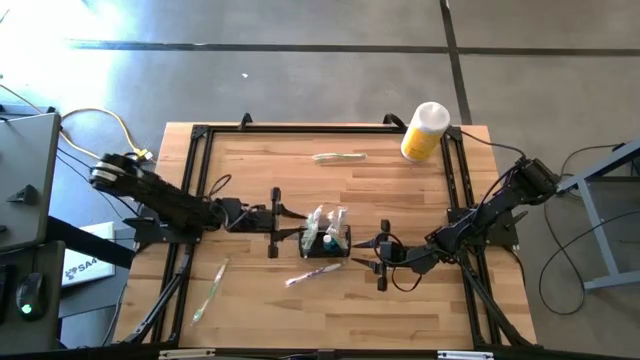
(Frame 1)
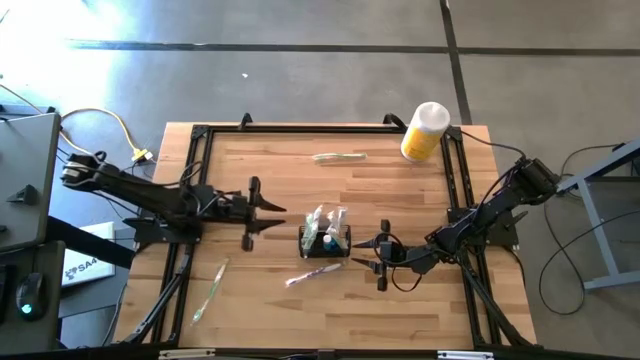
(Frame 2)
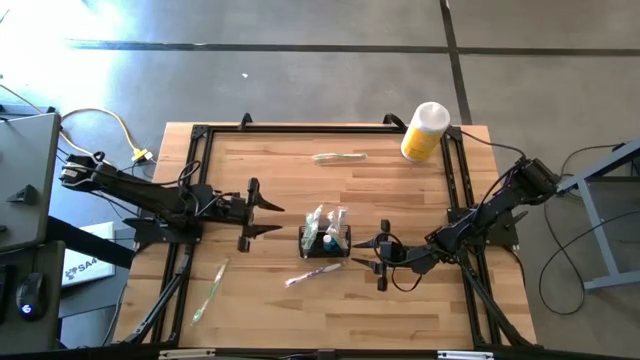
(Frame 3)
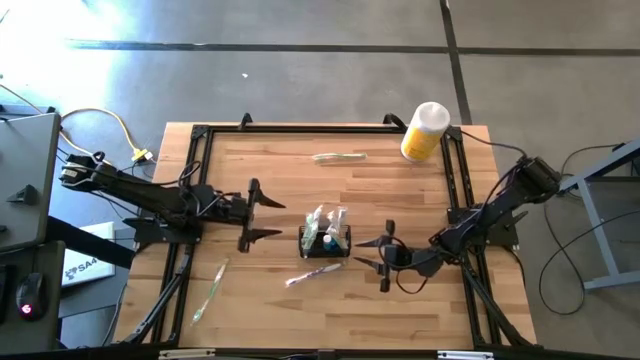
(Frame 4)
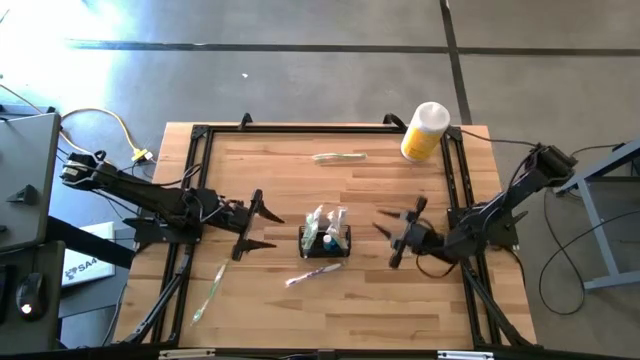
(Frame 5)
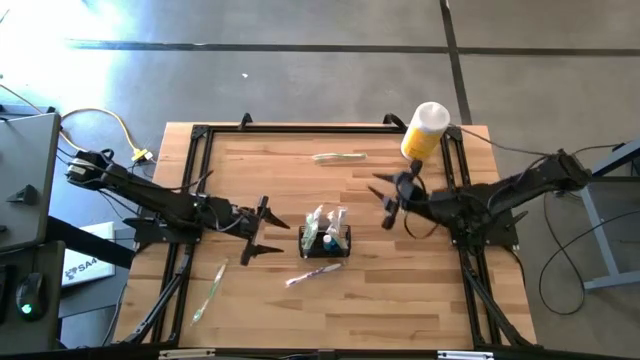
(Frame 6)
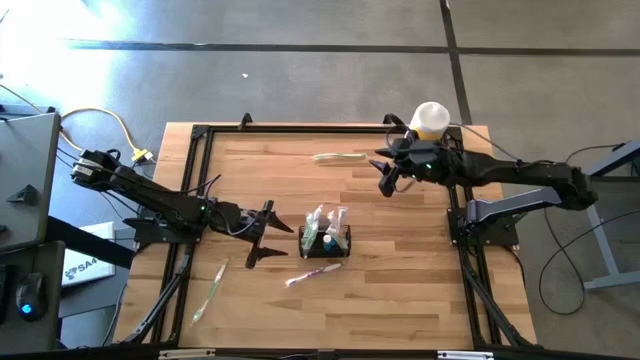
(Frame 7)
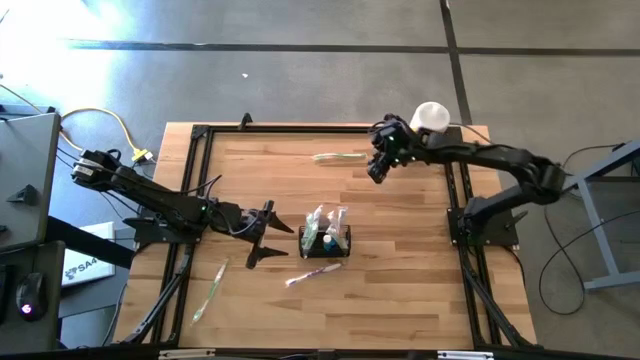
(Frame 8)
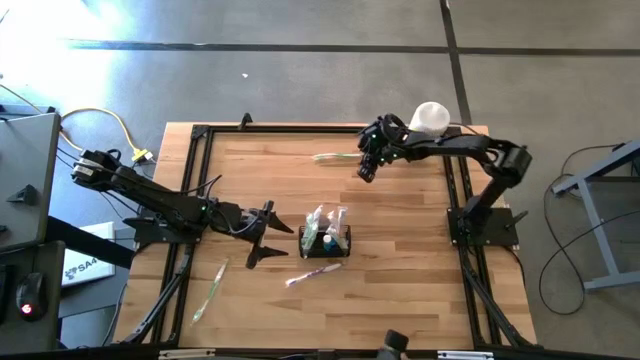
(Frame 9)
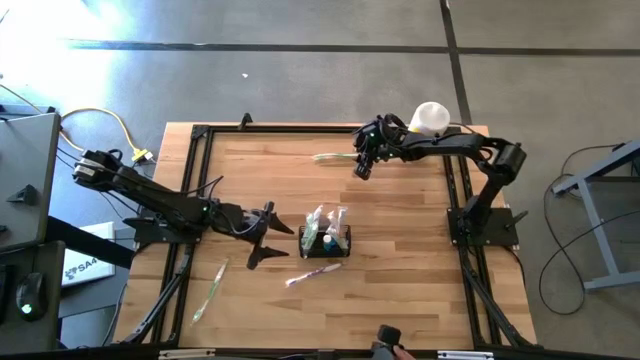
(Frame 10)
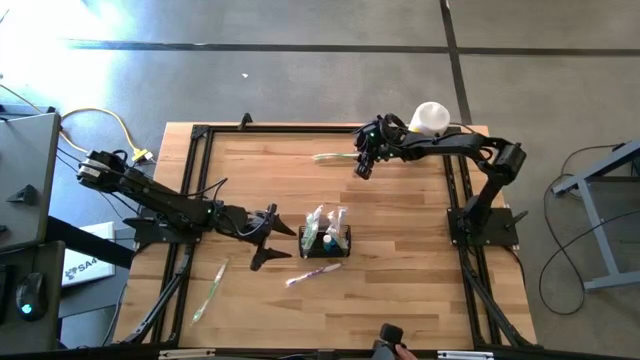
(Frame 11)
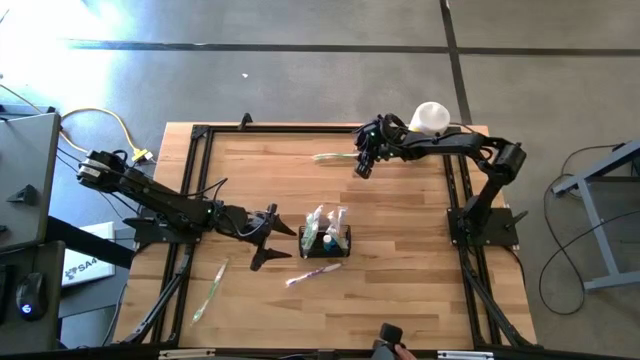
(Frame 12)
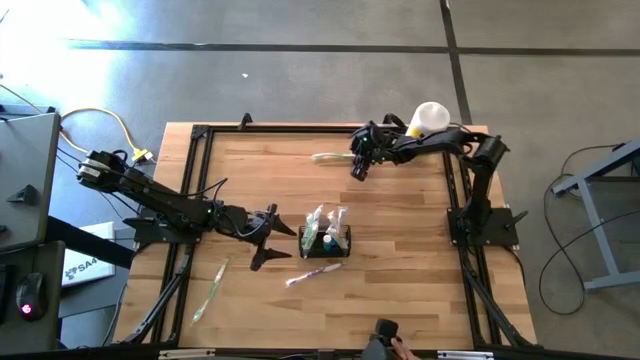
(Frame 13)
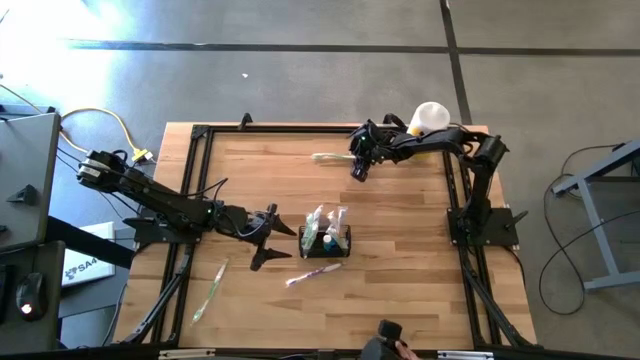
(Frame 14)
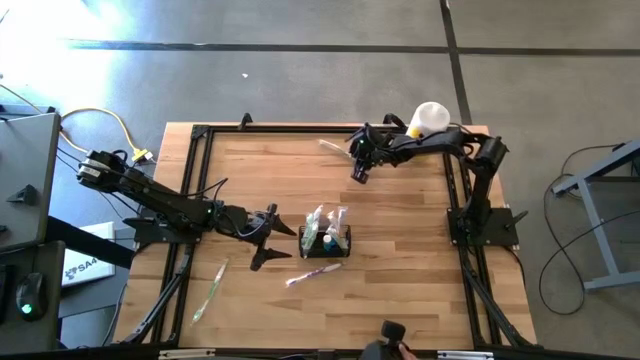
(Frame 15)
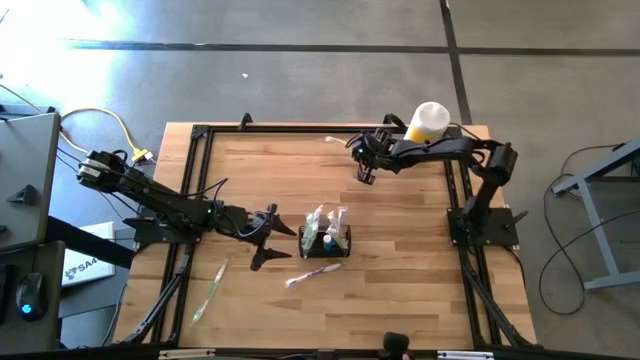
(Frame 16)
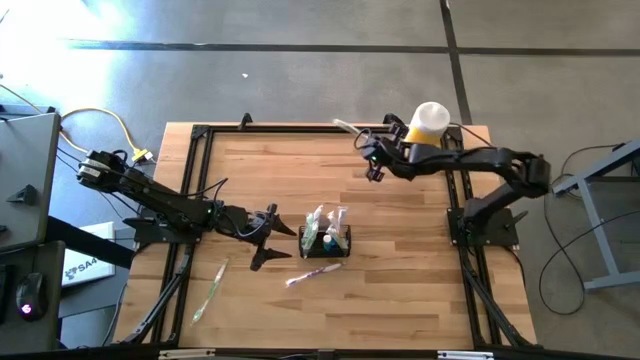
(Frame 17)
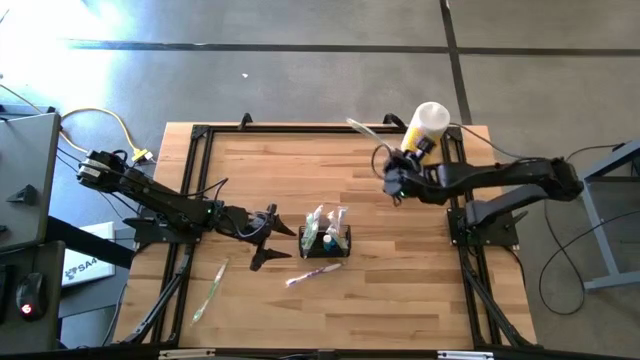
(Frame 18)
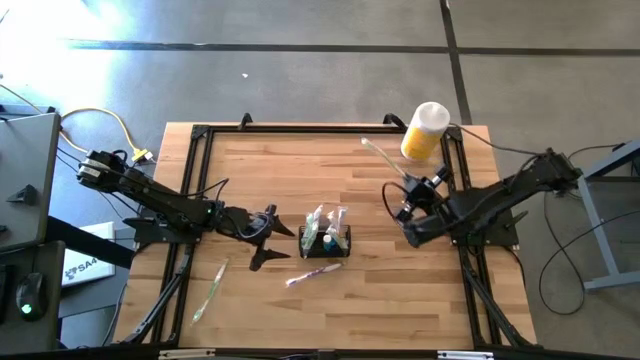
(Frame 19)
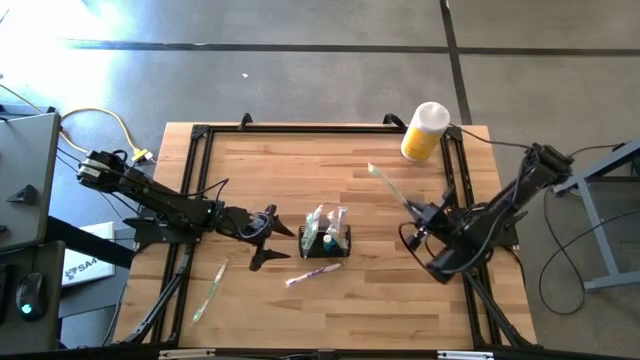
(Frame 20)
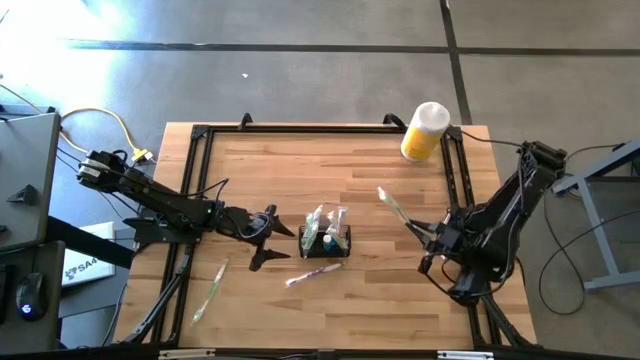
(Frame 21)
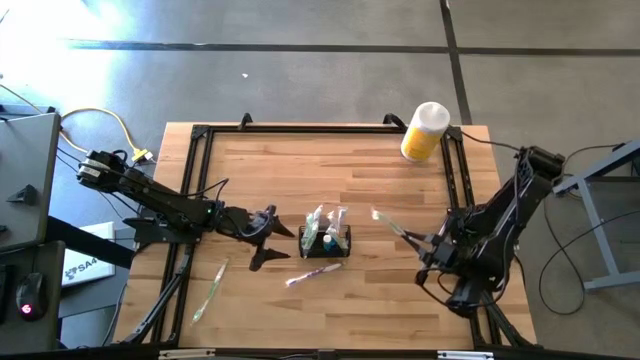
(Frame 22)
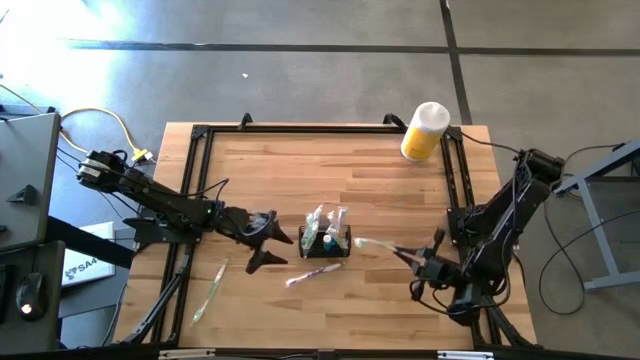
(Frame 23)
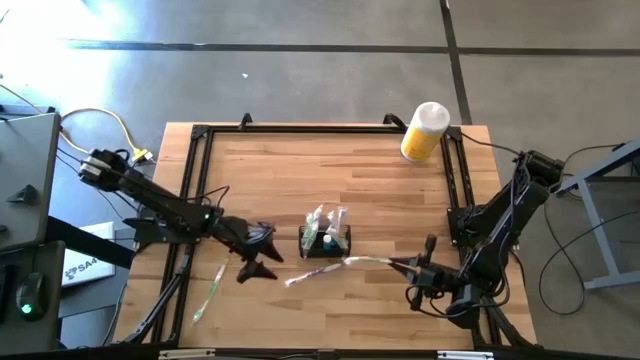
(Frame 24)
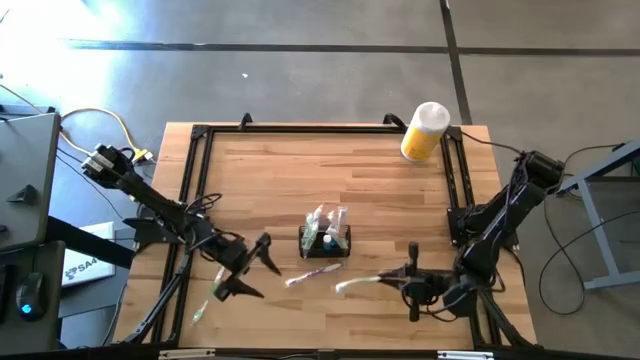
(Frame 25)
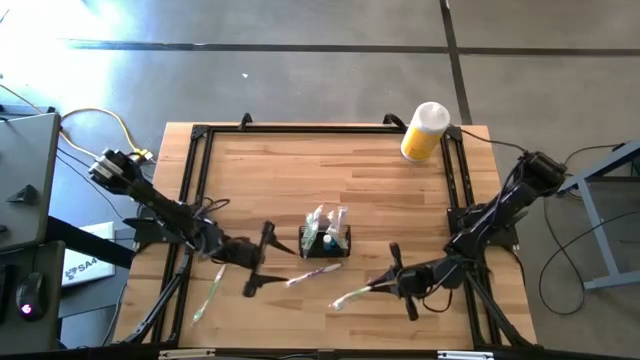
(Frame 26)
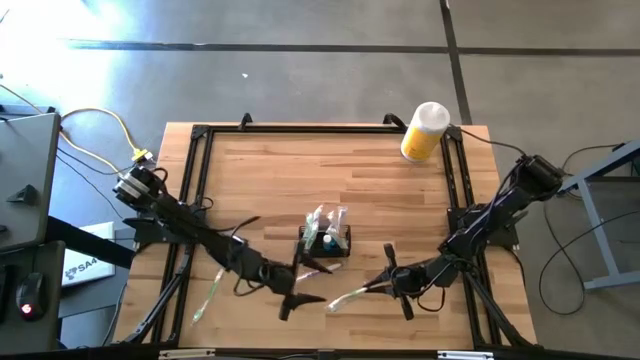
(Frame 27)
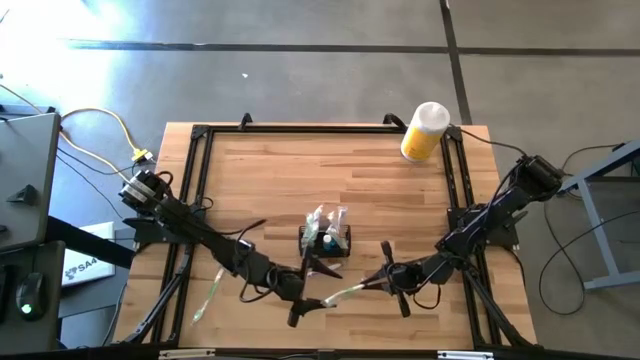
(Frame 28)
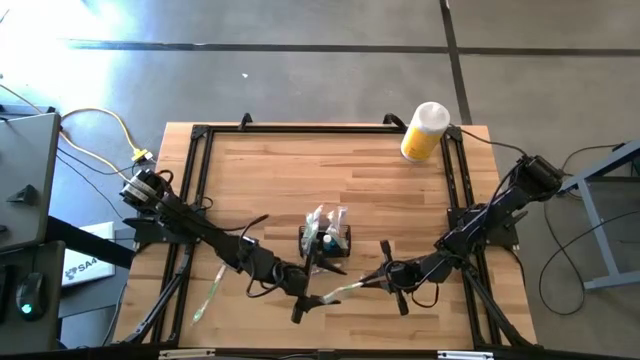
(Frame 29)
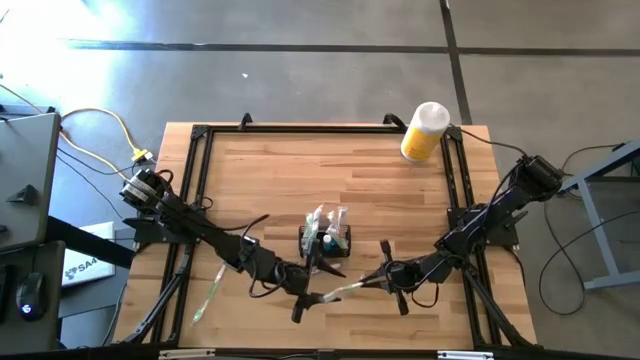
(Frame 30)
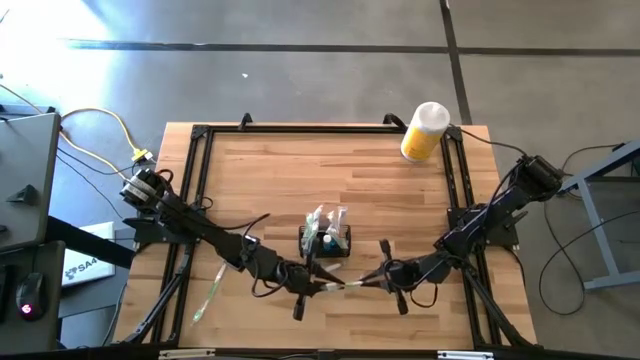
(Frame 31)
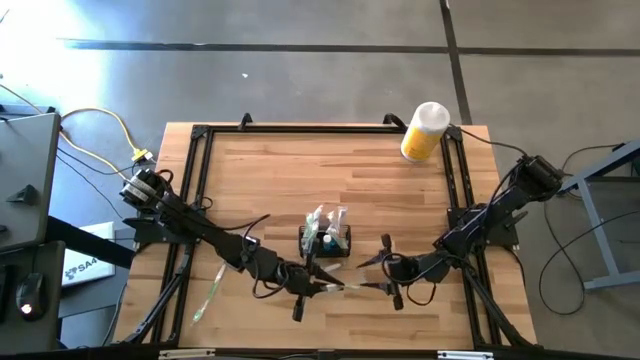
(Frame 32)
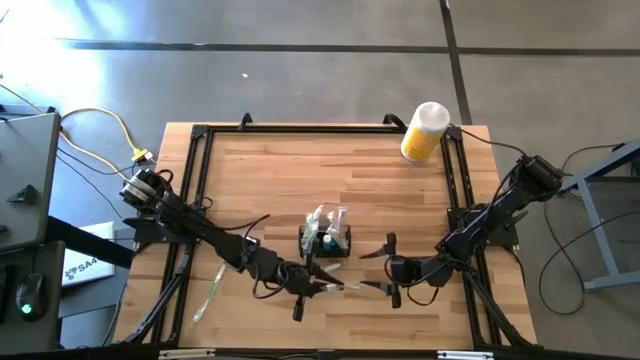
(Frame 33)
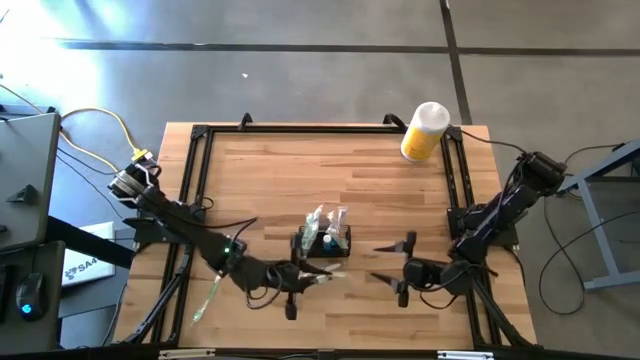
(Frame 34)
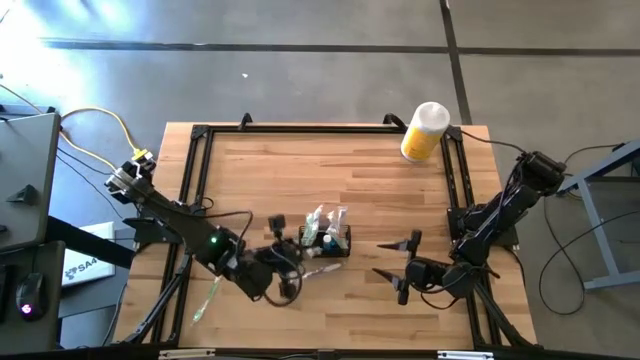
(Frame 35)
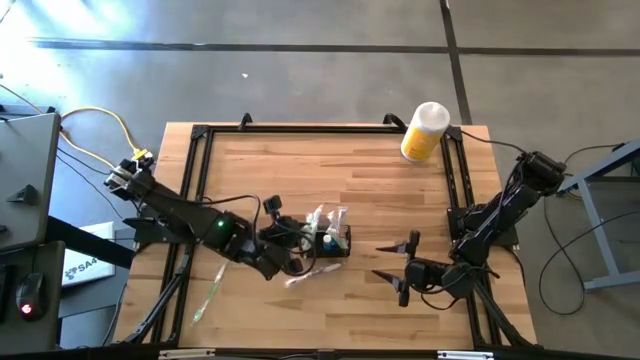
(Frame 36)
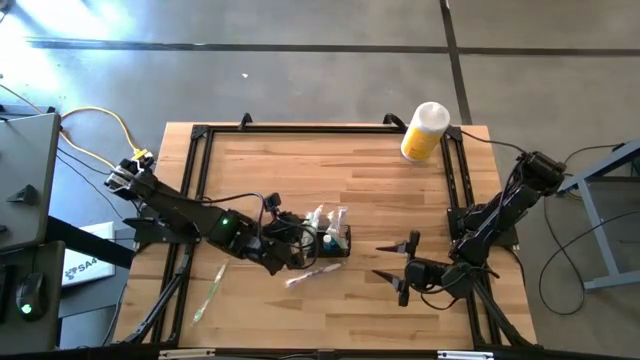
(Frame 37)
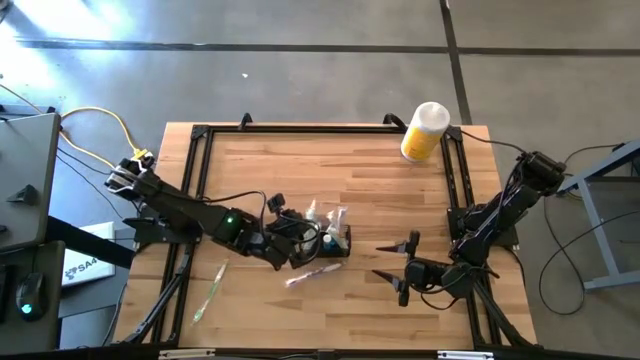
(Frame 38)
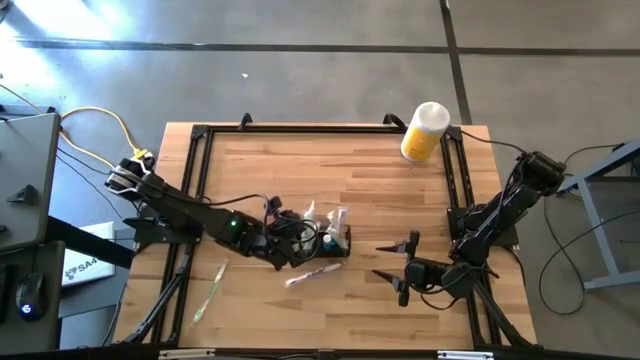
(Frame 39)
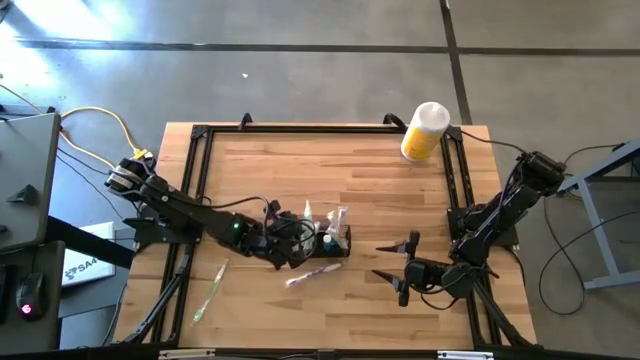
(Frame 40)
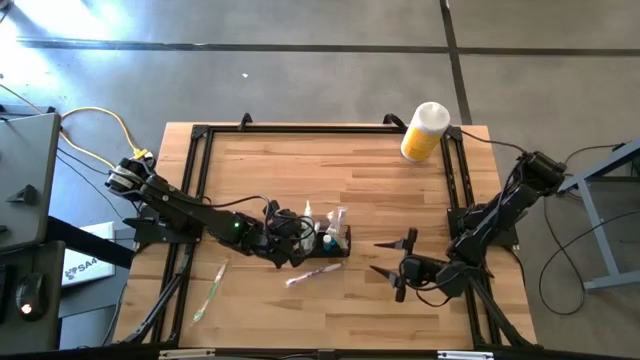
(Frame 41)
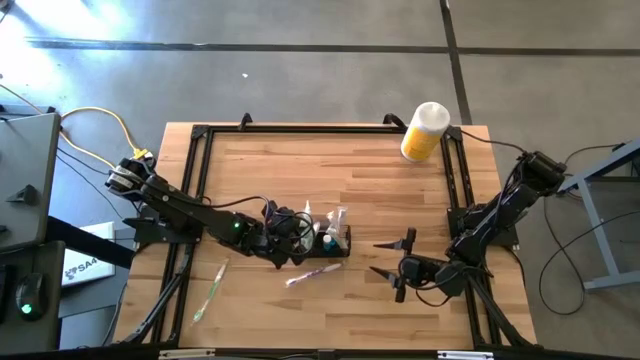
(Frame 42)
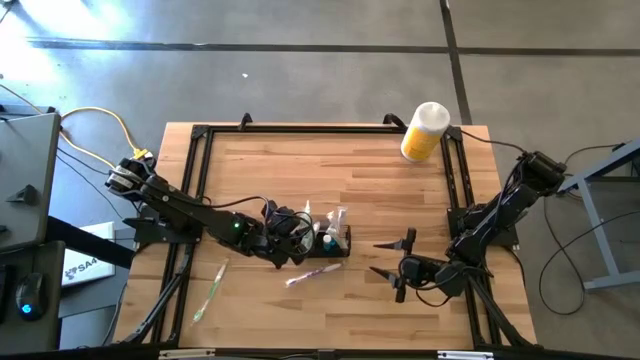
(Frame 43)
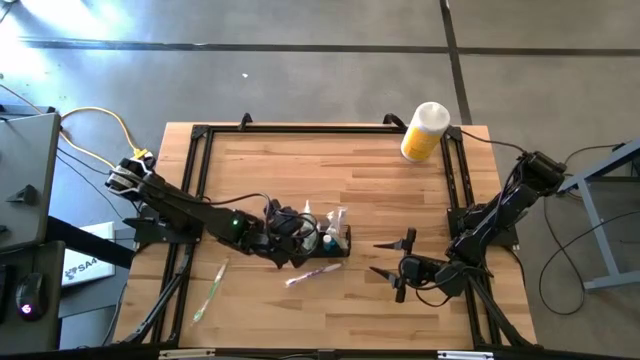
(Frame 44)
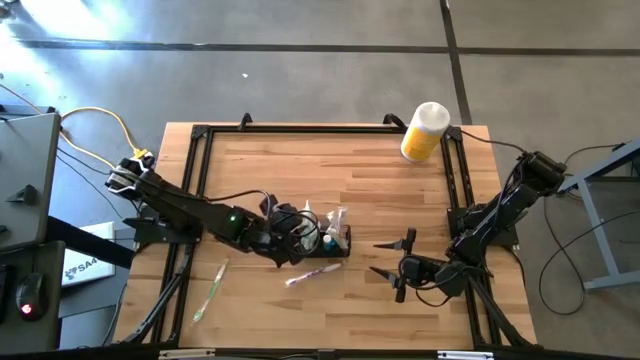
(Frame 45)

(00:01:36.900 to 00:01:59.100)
Task: Pick & Place toothbrushing station
Put the green toothbrush into the black wire organizer
